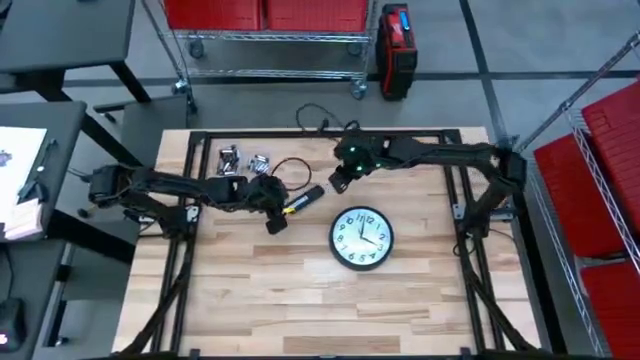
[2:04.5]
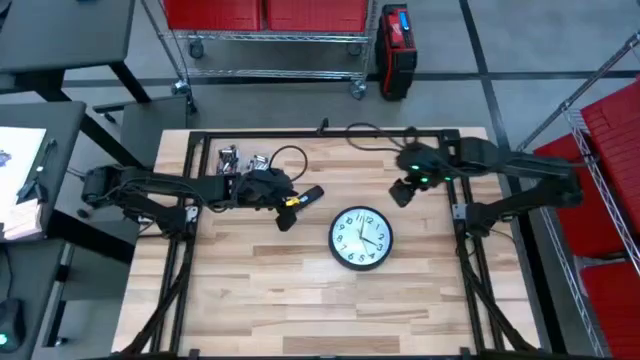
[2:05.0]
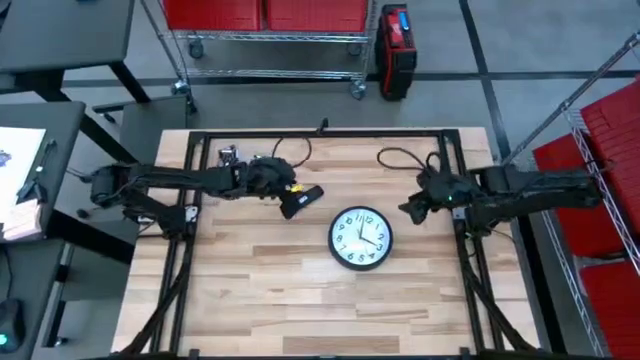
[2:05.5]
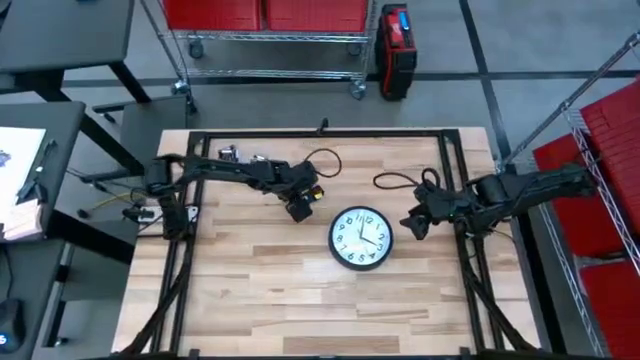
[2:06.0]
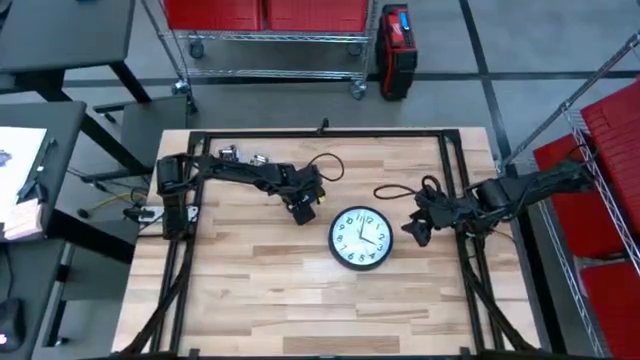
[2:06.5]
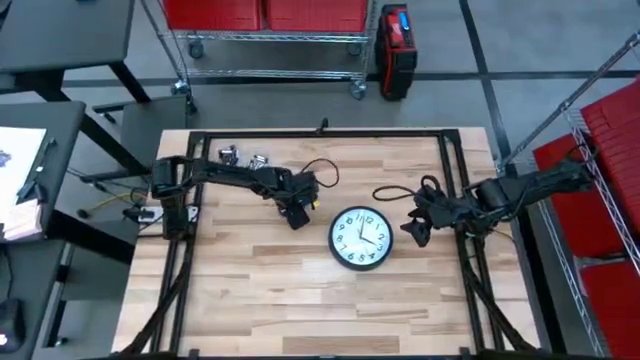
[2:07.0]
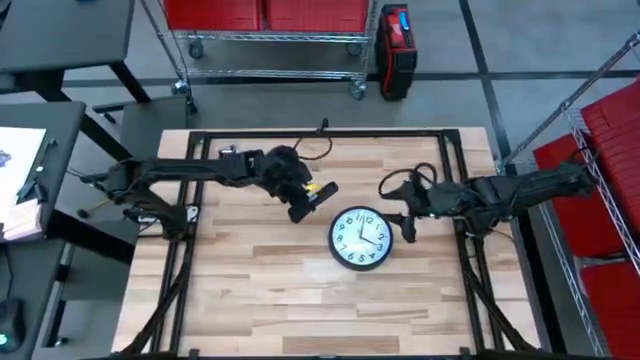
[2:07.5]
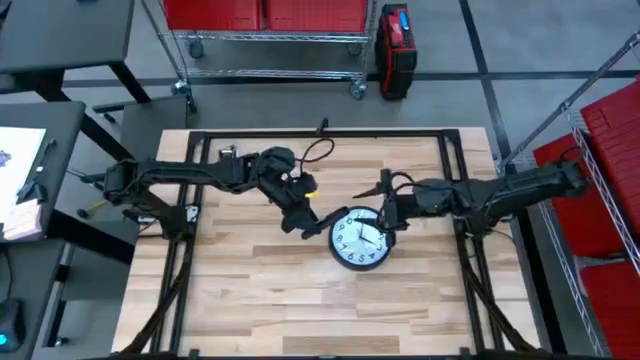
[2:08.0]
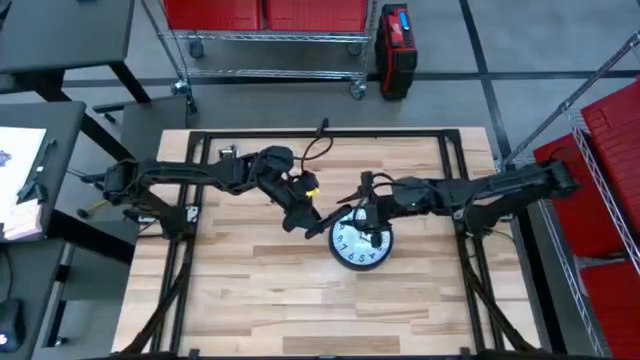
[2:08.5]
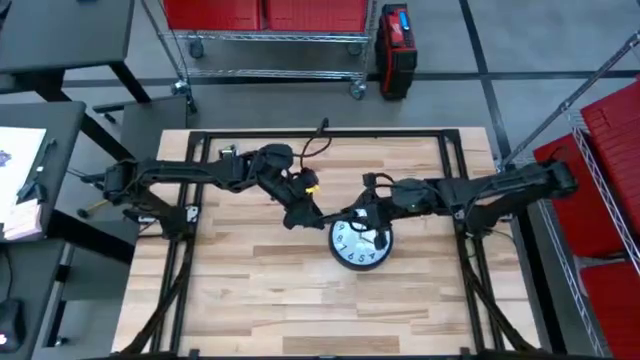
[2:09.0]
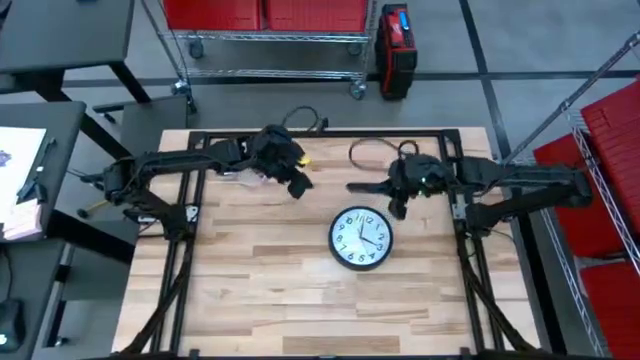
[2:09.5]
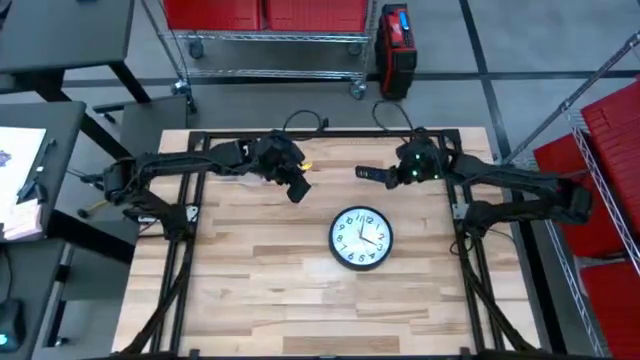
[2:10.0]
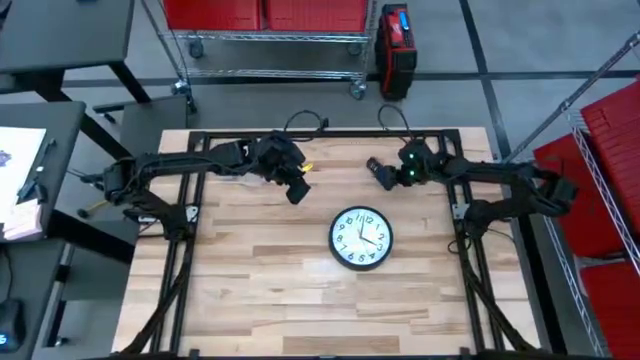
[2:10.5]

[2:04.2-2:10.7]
Task: Insert battery
Move the remote to the right side of the table

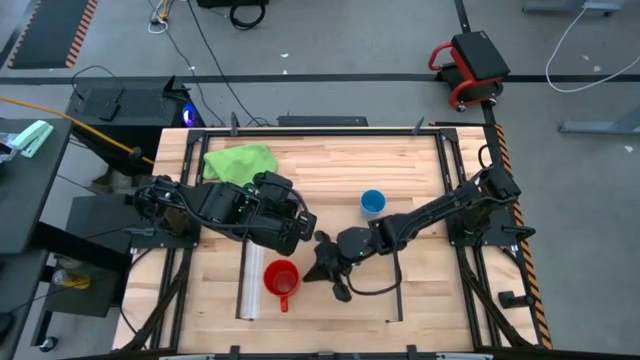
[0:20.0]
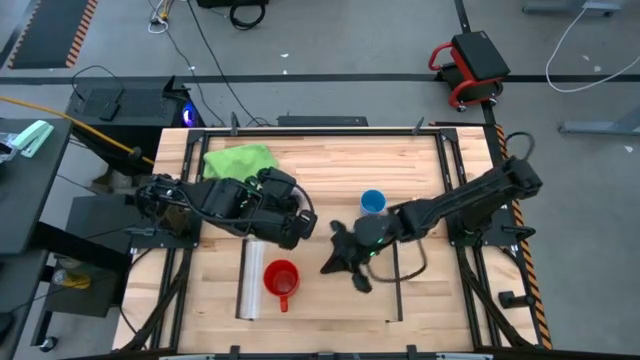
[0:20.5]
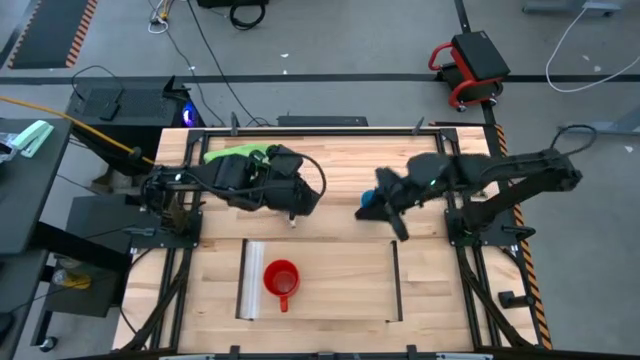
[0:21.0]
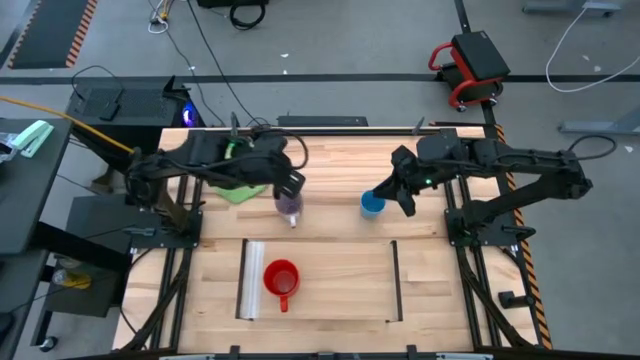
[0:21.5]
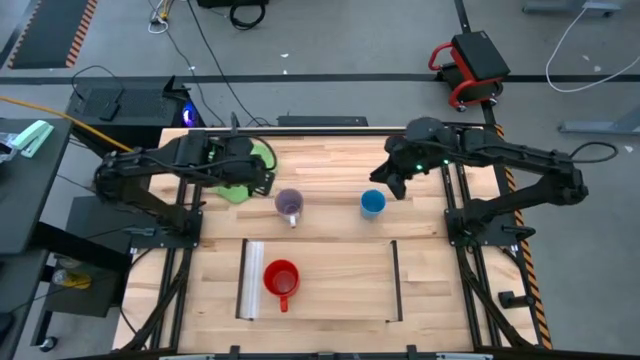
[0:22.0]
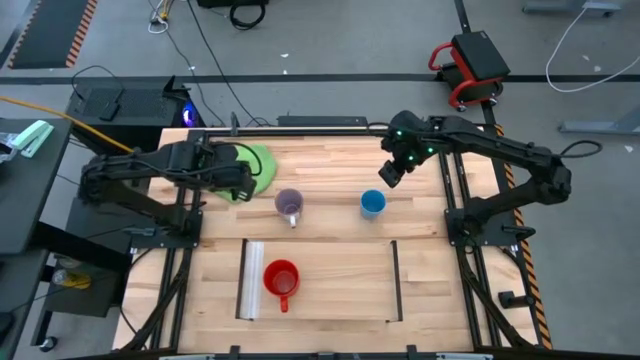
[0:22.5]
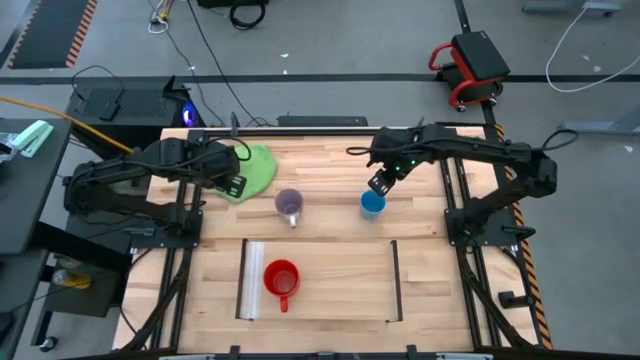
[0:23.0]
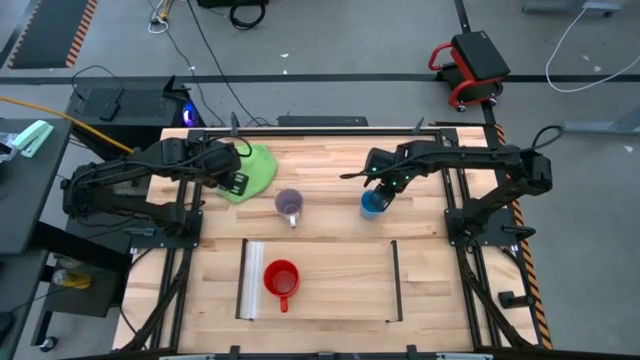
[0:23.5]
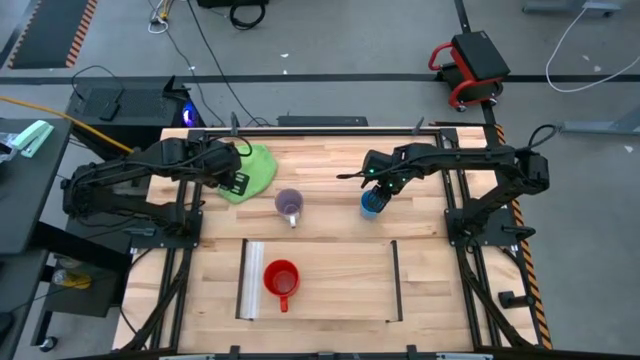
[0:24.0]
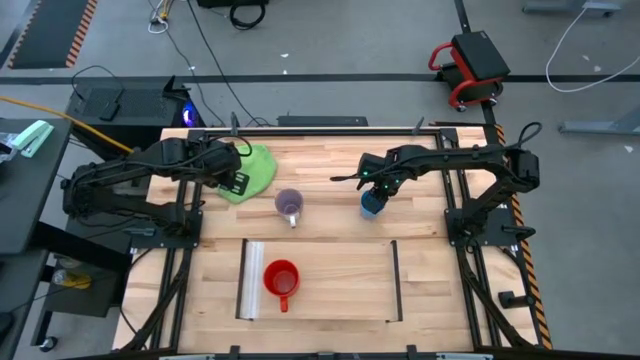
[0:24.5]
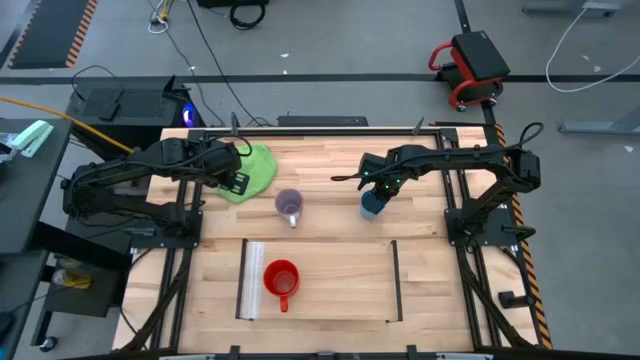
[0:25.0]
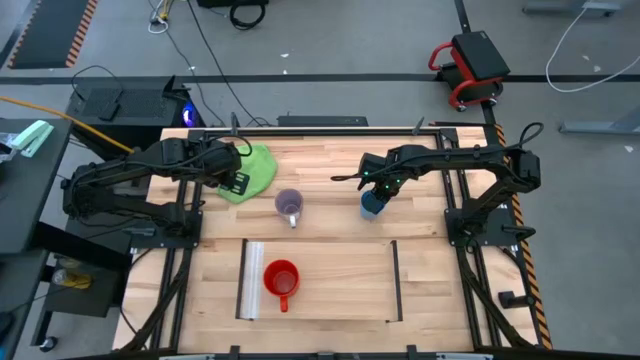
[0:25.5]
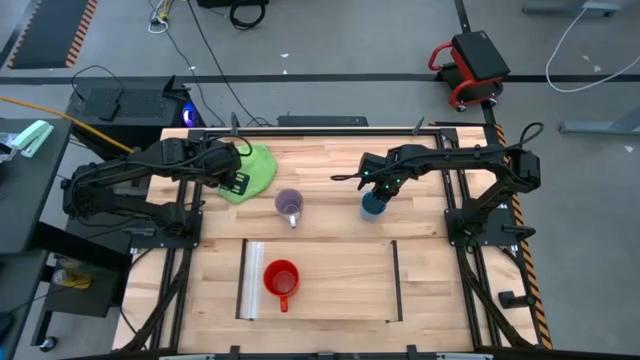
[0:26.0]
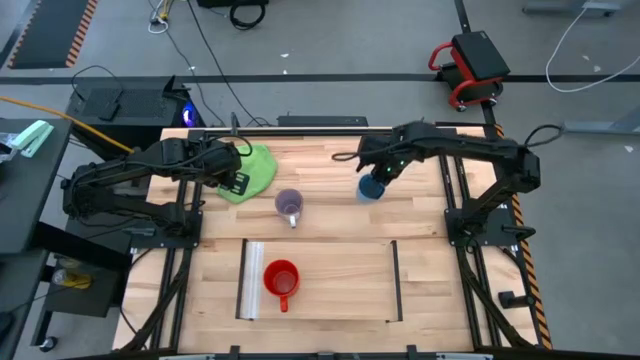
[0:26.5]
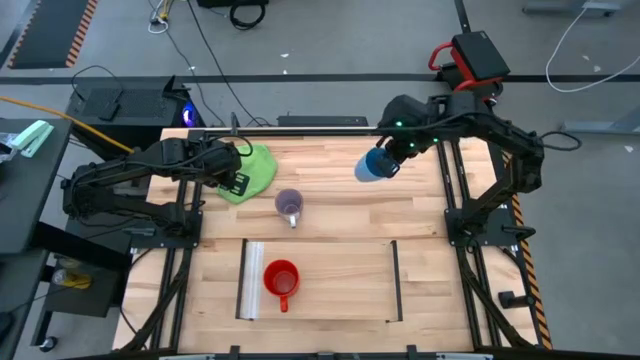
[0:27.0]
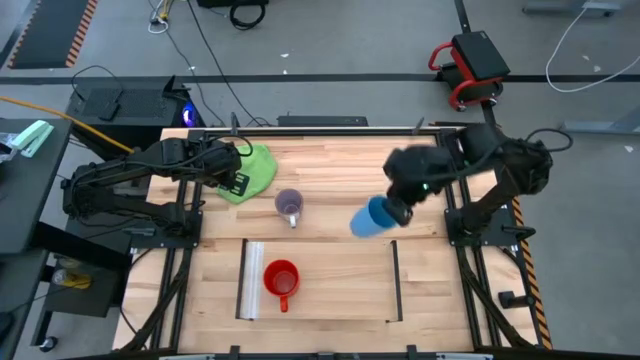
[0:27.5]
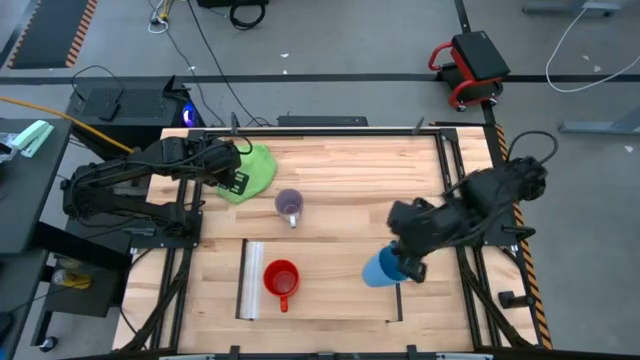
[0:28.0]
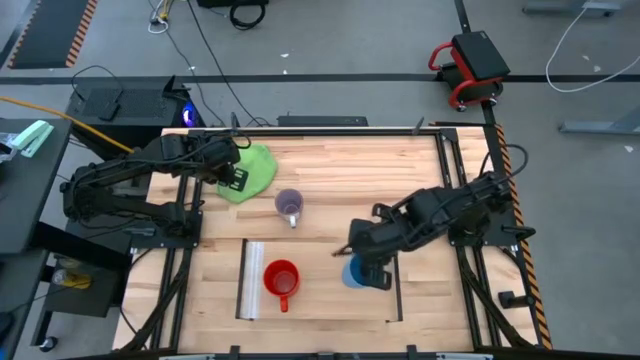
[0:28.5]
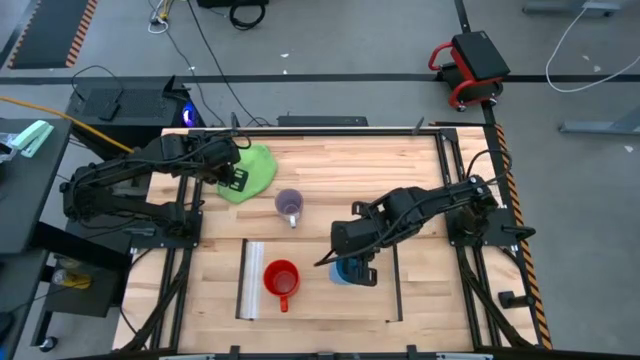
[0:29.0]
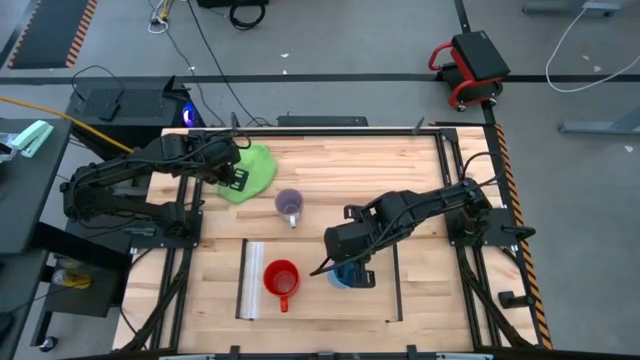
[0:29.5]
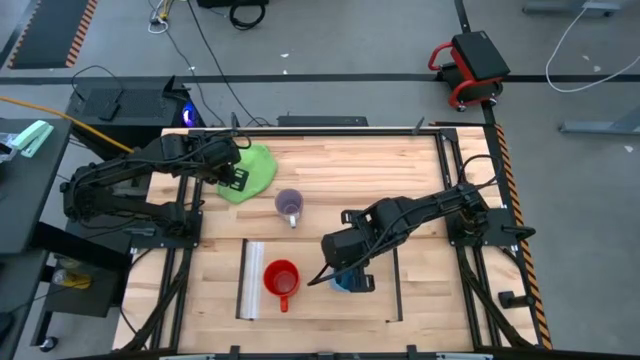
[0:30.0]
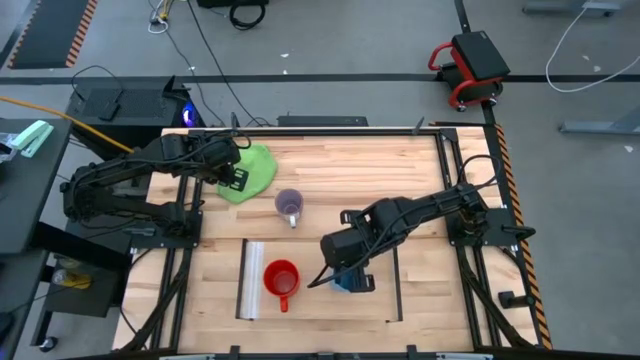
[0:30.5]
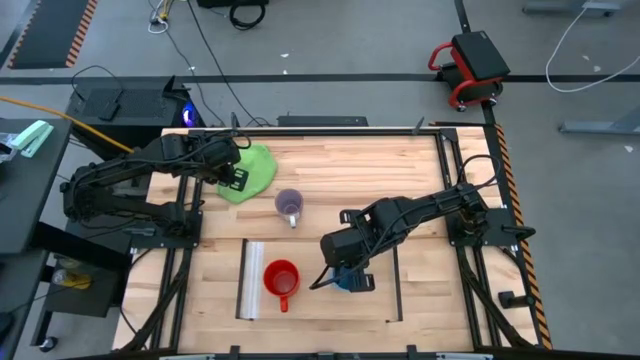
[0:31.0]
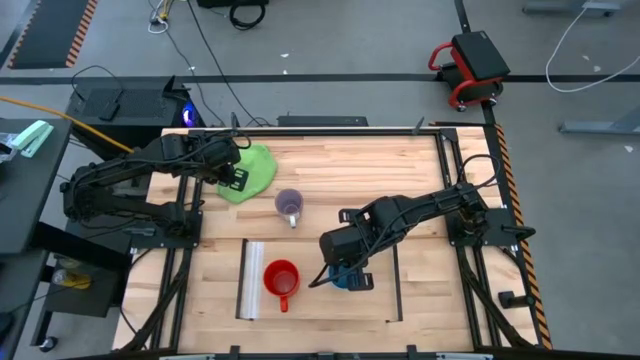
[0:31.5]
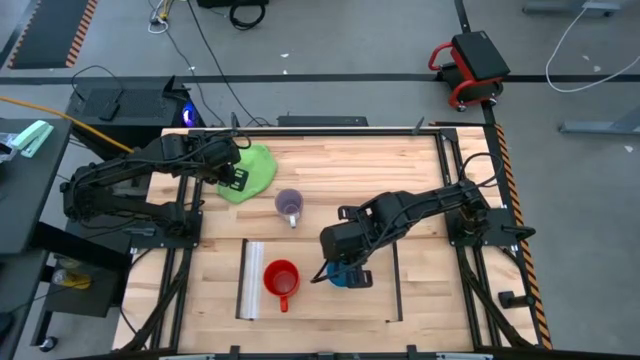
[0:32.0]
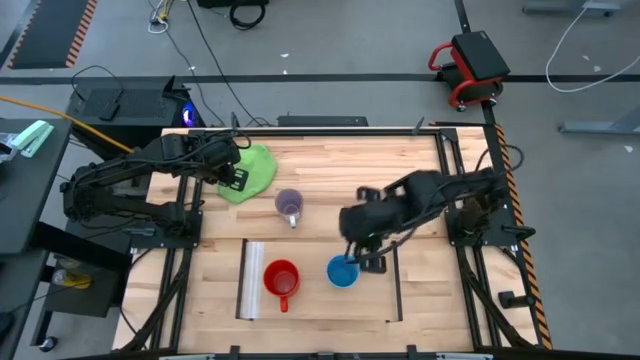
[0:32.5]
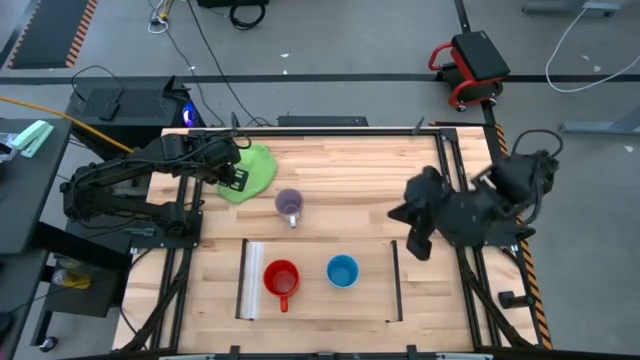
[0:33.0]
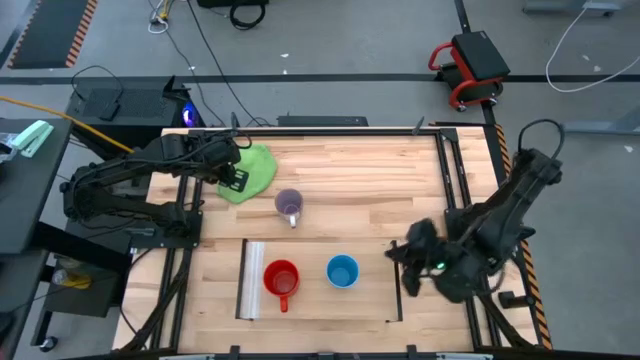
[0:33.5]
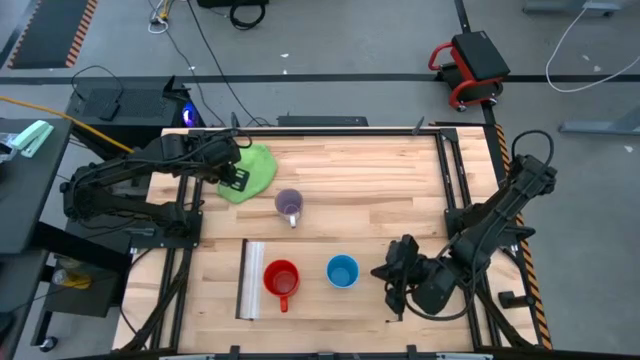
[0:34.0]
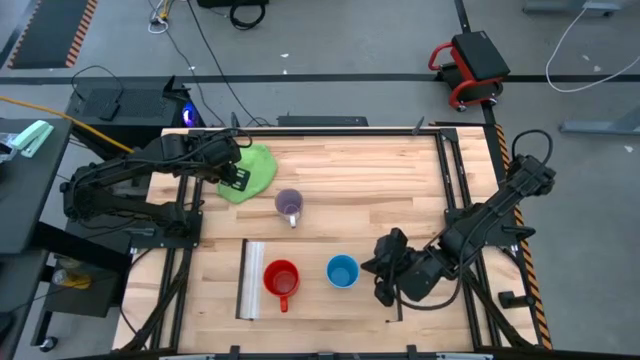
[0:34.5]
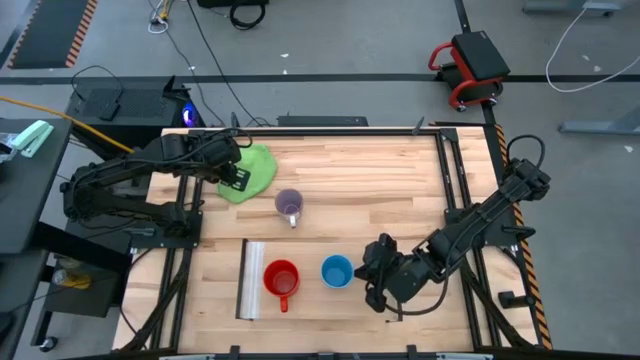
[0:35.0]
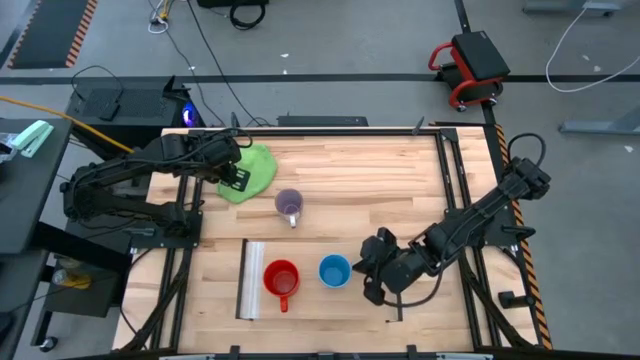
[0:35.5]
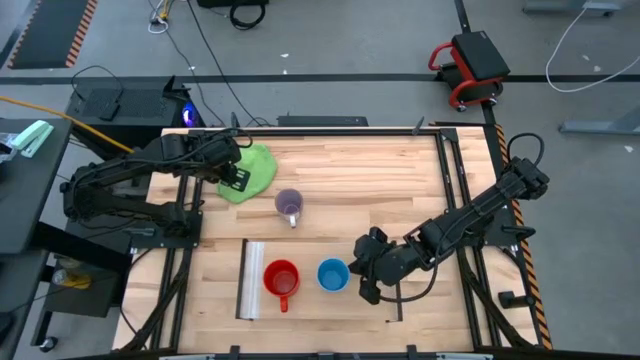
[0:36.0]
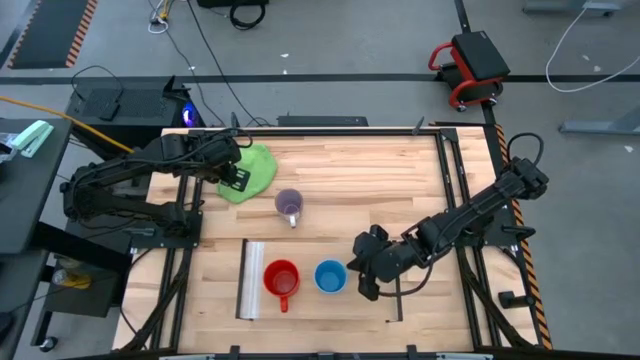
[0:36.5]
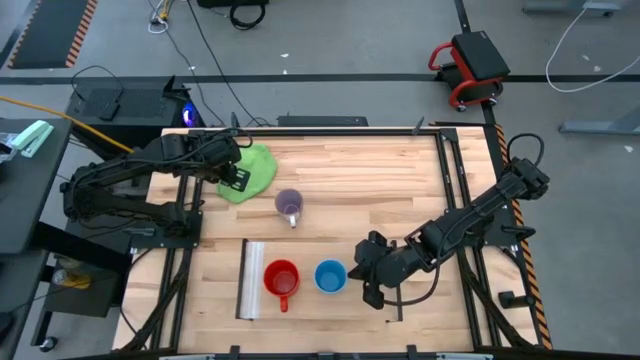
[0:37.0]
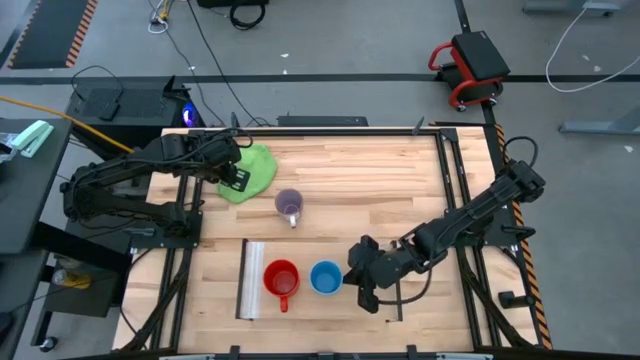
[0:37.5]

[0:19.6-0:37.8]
Task: Stack small to large cups/mugs on shelf
Put the blue cup on the shelf
